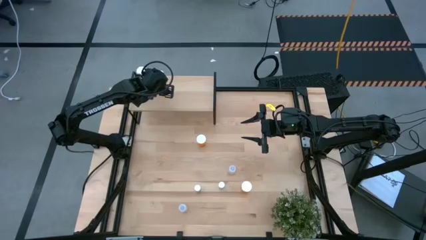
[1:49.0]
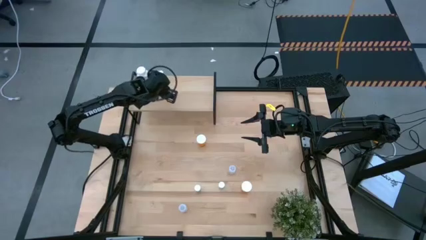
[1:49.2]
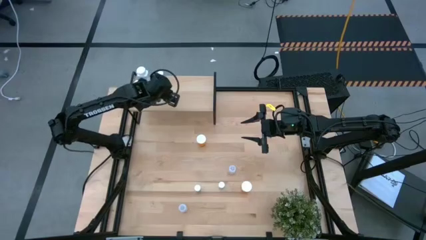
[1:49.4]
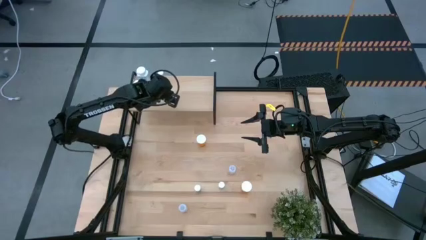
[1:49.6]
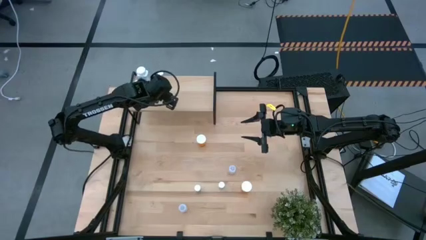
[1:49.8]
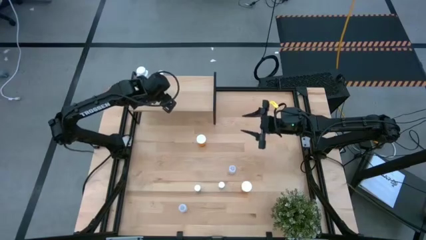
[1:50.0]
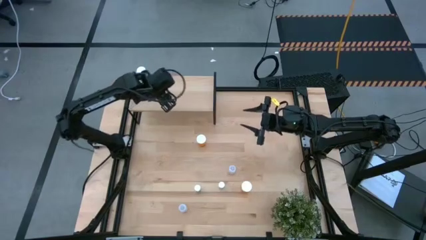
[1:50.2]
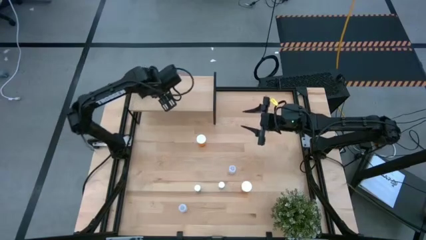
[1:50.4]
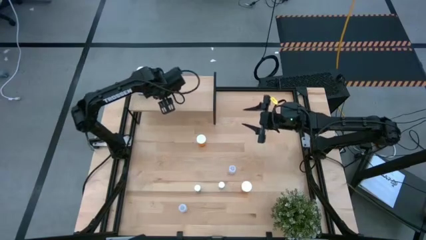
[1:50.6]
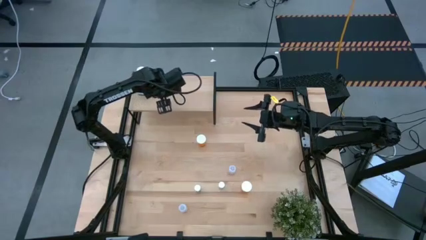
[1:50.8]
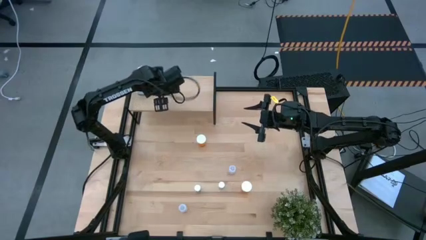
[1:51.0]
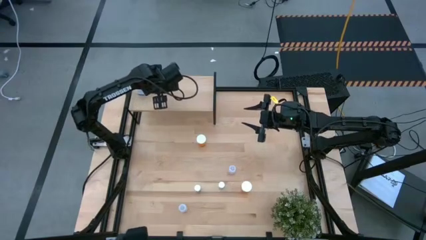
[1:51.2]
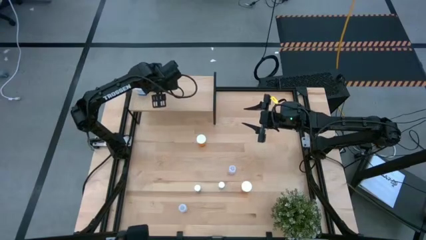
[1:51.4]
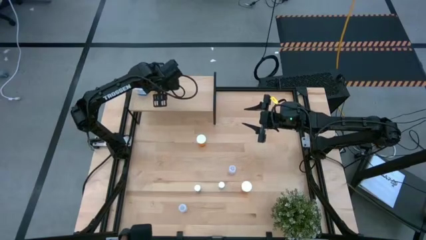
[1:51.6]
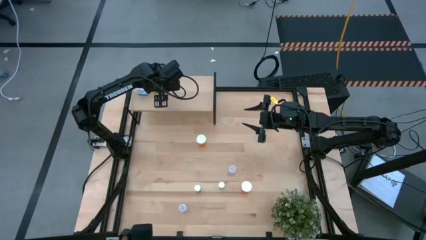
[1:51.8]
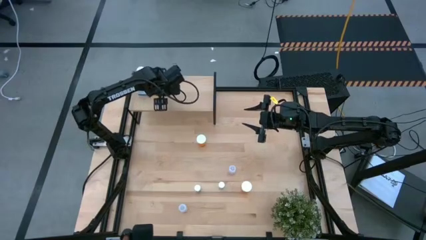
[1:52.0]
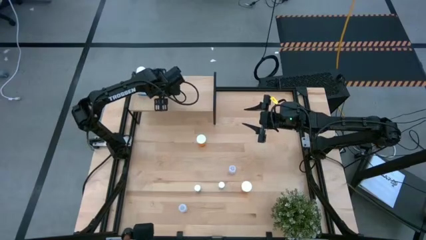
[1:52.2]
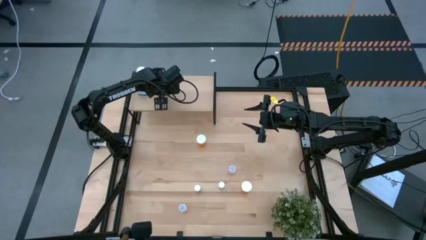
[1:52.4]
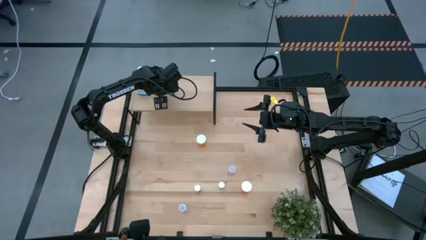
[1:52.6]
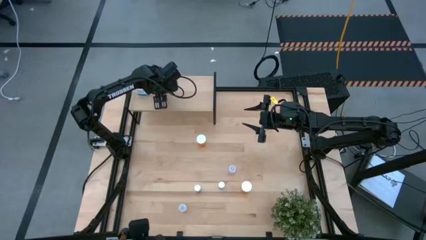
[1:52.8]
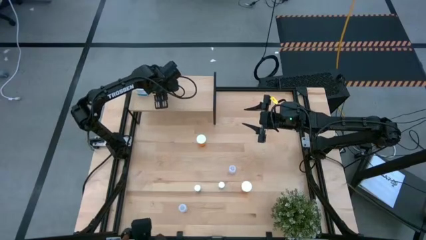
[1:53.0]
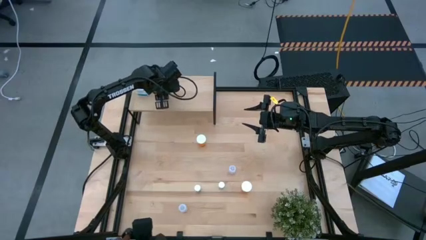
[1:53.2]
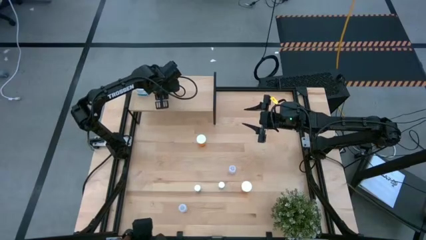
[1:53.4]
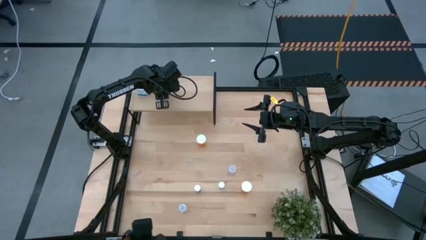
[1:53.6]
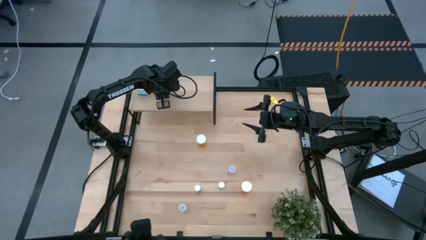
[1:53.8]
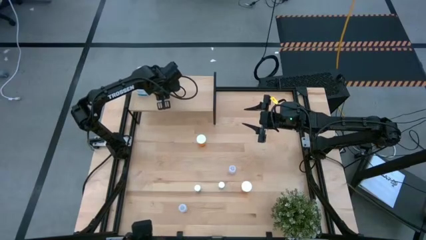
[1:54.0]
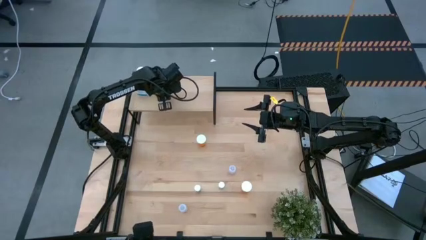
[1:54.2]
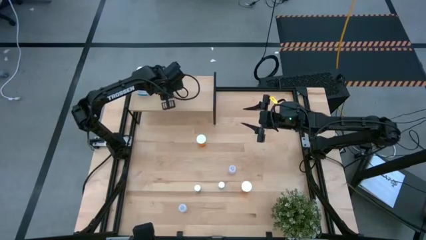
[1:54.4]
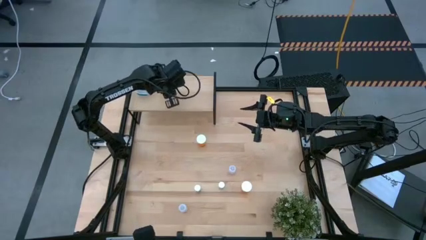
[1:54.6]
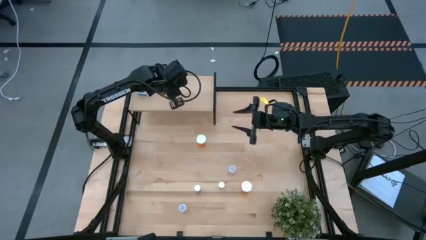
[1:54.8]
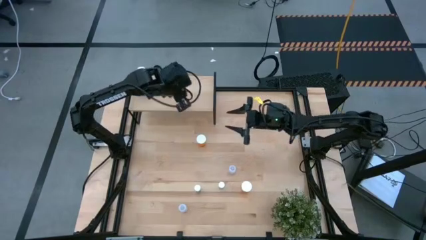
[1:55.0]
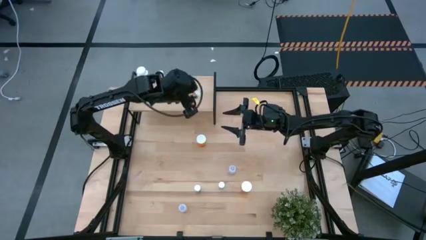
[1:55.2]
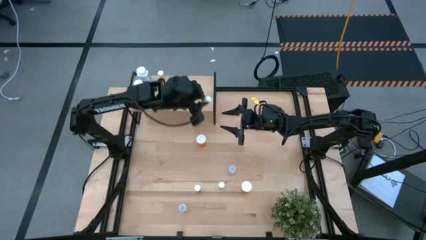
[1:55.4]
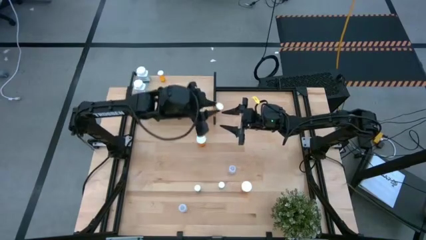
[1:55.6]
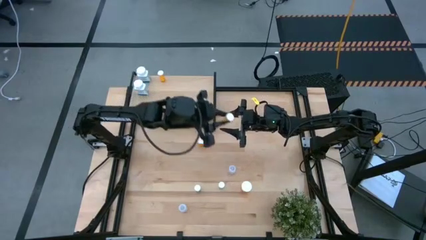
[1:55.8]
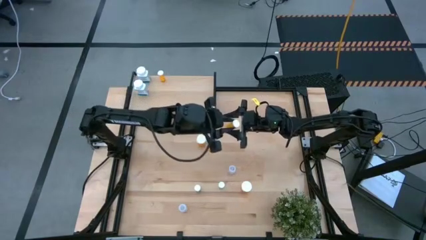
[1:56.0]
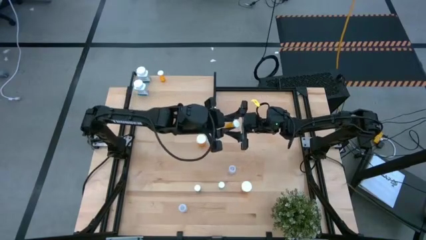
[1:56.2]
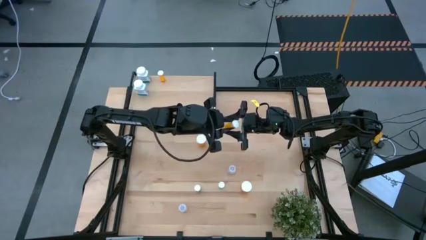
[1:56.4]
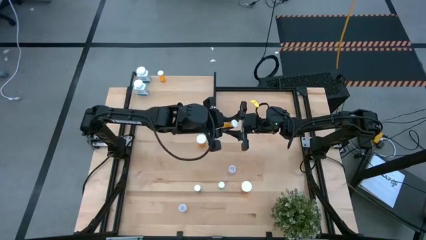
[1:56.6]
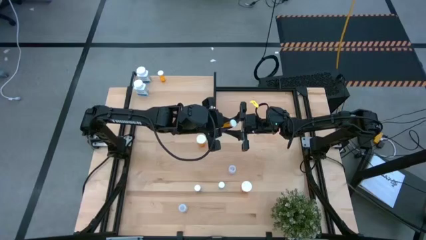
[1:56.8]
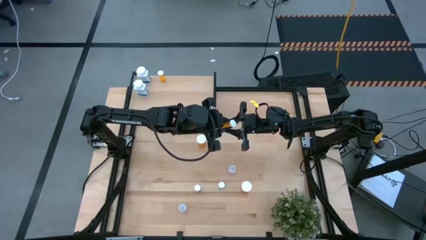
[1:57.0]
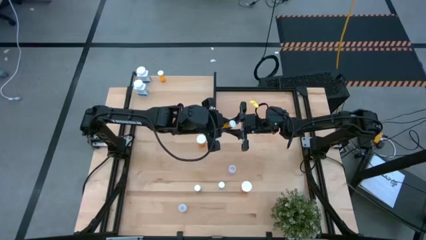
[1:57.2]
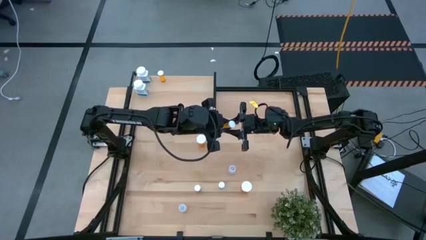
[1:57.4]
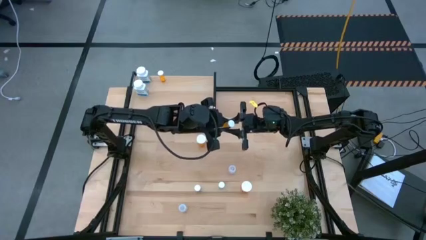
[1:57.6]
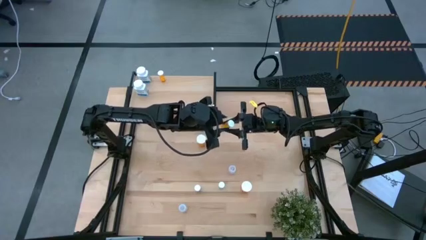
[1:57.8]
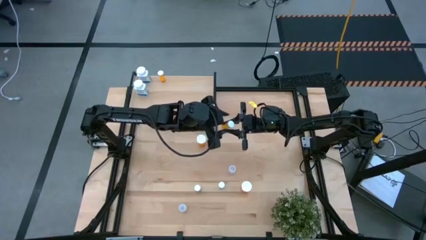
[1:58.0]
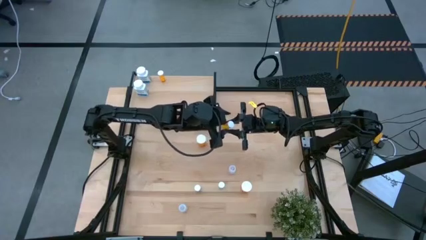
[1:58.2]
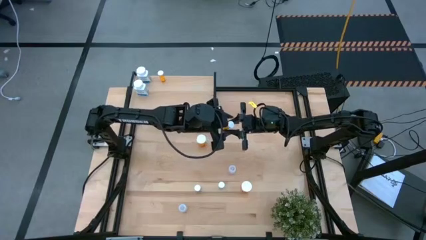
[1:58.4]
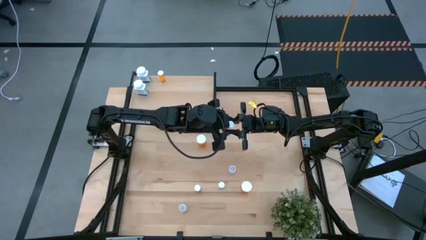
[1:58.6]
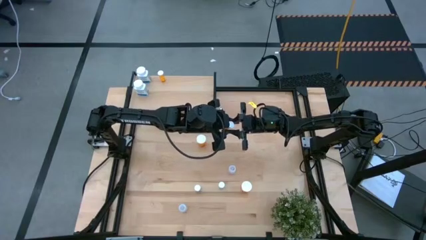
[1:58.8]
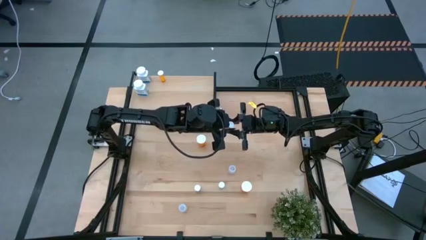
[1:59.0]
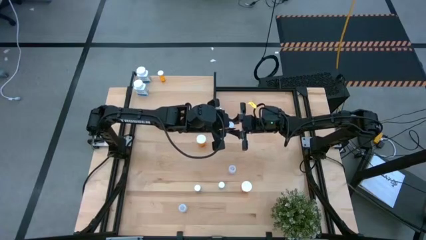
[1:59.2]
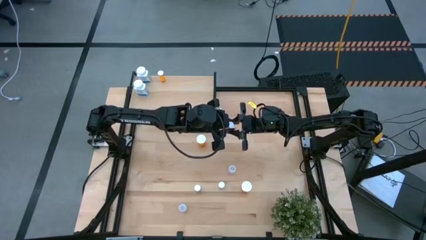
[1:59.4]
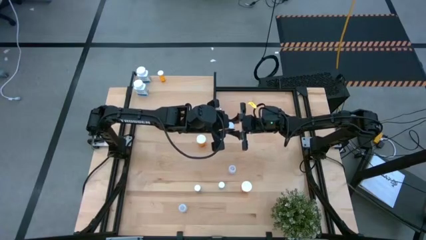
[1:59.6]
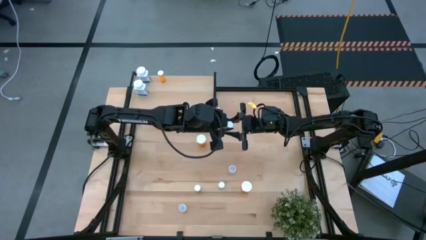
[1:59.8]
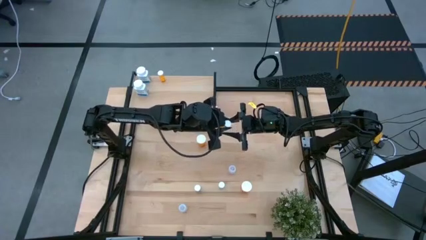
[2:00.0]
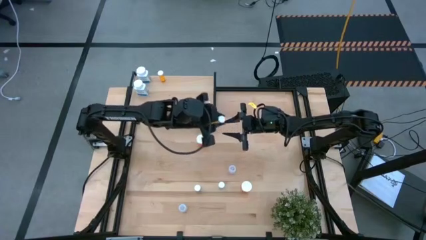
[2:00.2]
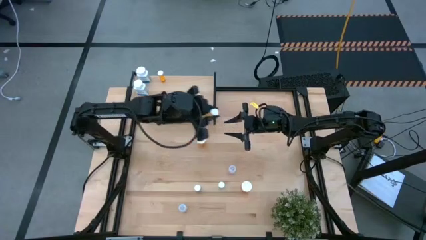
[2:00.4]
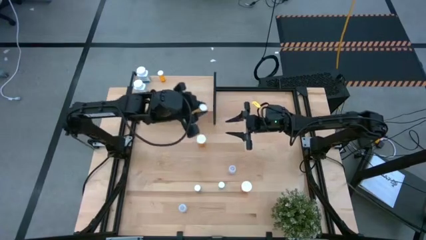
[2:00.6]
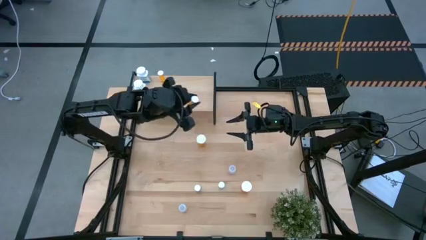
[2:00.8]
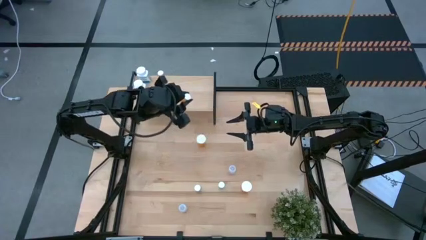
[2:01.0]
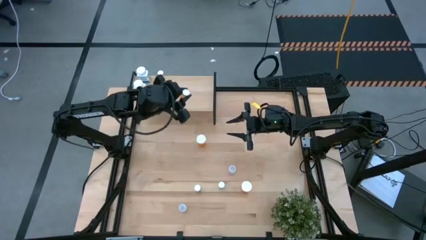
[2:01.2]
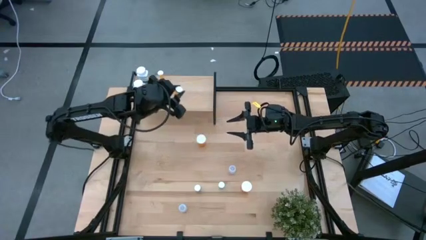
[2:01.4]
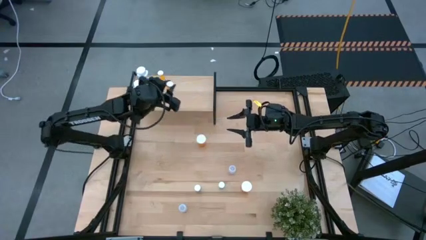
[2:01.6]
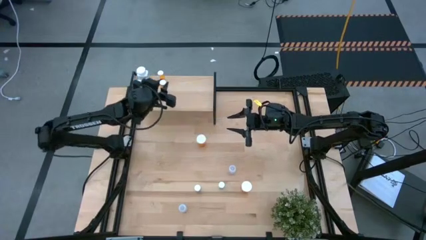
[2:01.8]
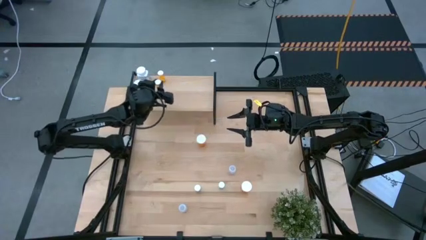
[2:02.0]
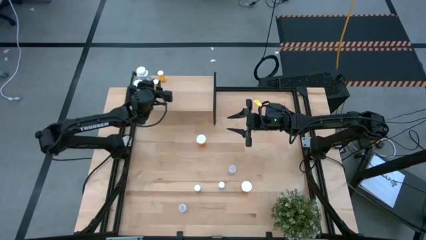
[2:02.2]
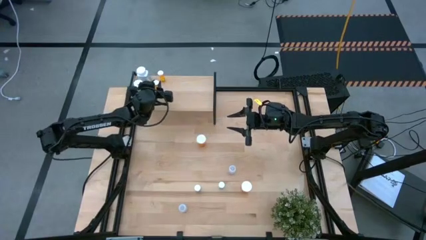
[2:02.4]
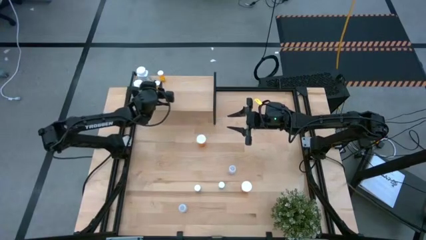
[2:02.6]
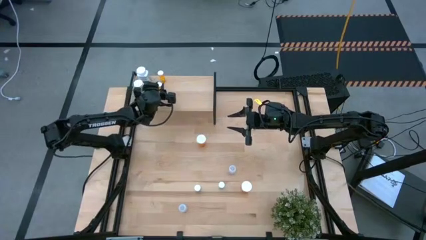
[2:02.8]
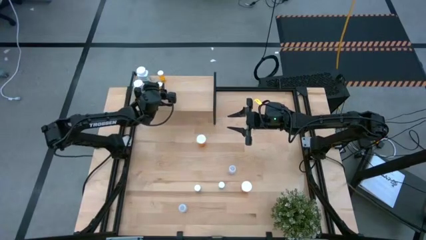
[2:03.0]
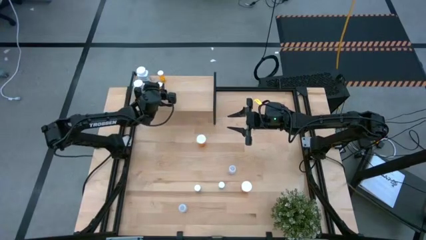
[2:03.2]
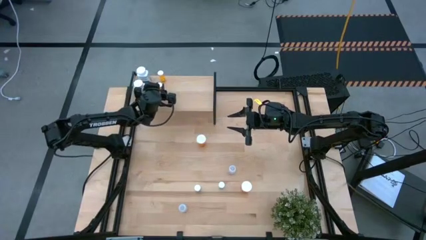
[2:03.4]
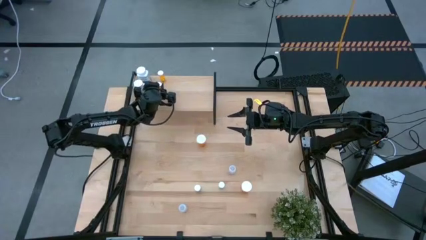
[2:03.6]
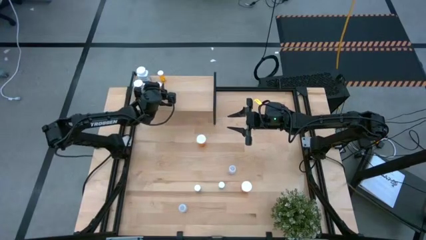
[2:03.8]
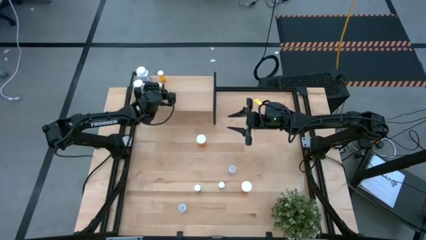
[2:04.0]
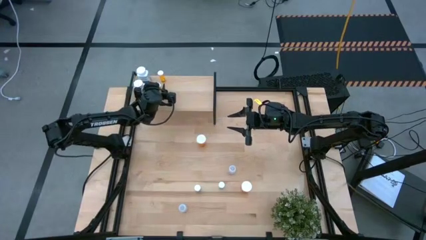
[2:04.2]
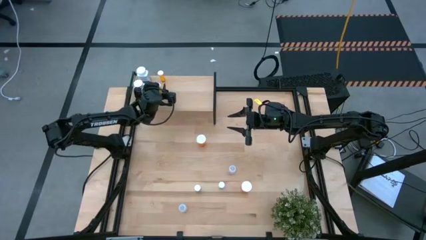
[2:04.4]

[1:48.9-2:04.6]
Task: Pick and place medicine bottles onto shelf by color
Put the small orange pill bottle on the shelf aligned with the other small orange pill bottle

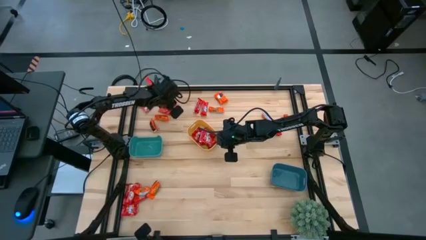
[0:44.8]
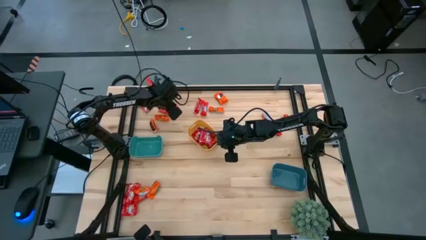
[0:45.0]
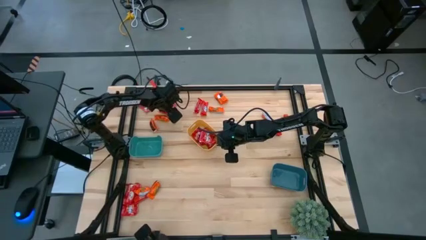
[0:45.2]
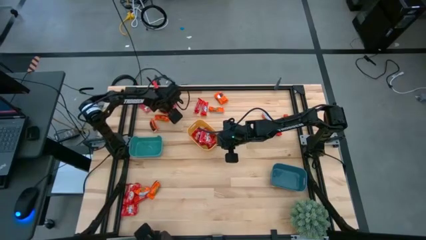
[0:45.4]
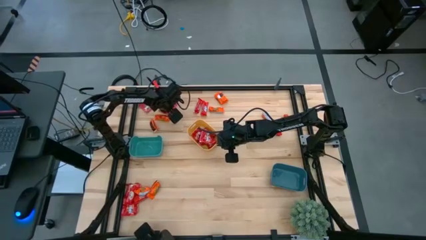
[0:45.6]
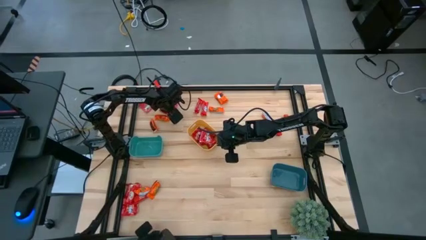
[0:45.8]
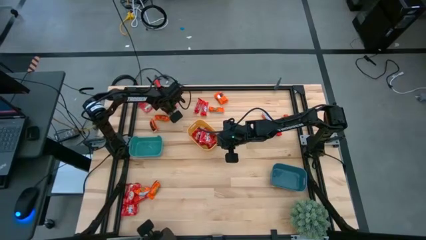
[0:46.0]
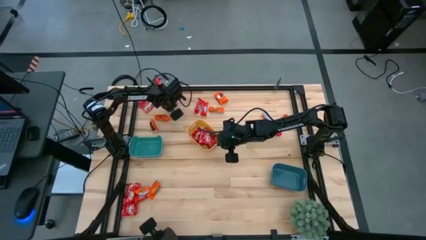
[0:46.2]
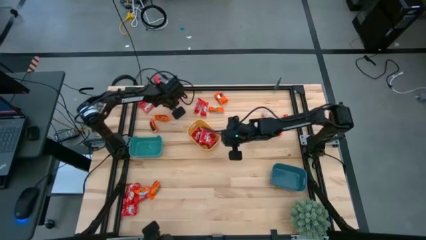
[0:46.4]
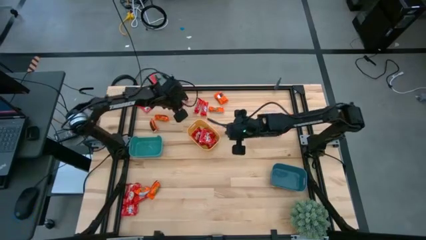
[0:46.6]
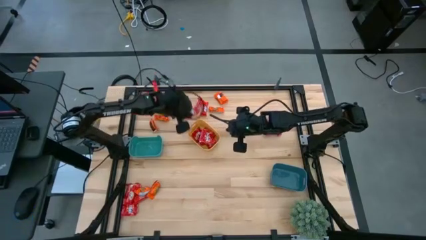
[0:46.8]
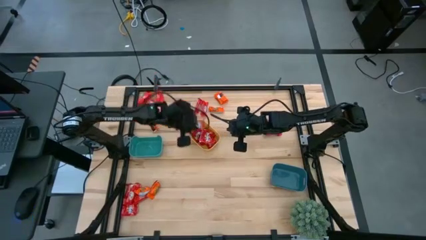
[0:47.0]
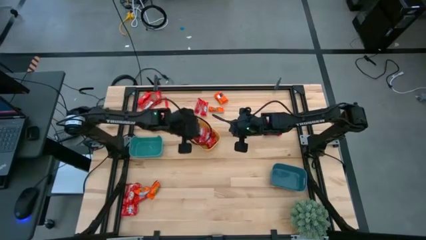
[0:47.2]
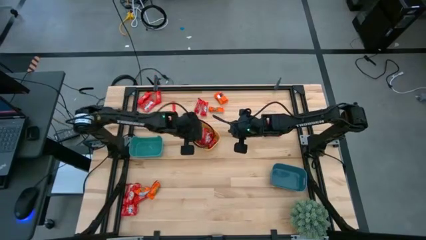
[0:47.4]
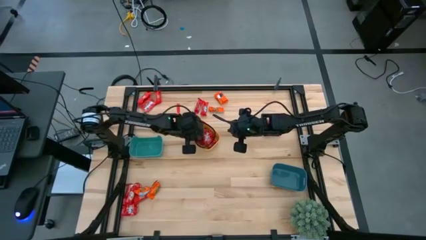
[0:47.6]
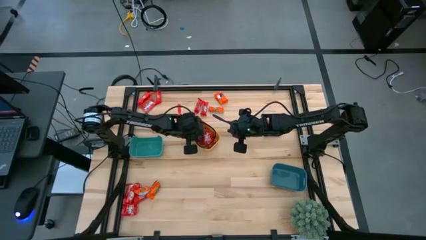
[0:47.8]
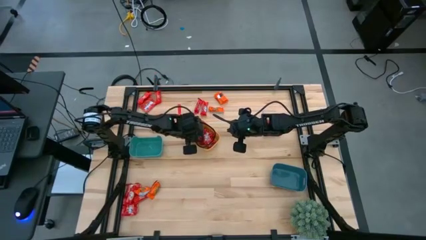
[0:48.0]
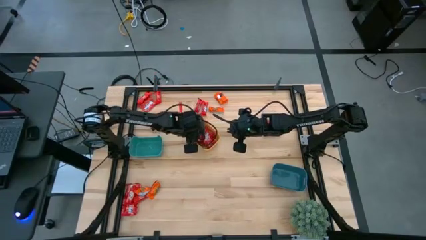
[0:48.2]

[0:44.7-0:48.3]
Task: Sort candy
Put the red candy into the yellow bin
